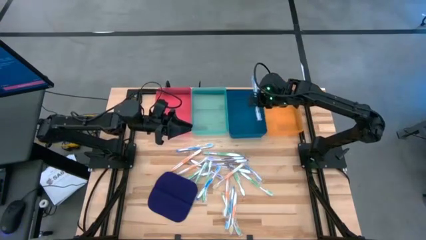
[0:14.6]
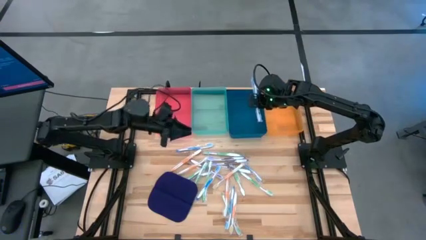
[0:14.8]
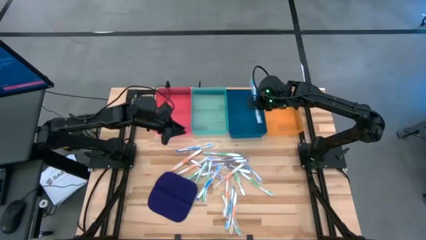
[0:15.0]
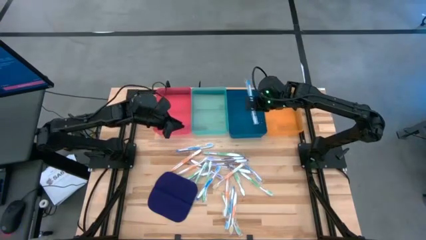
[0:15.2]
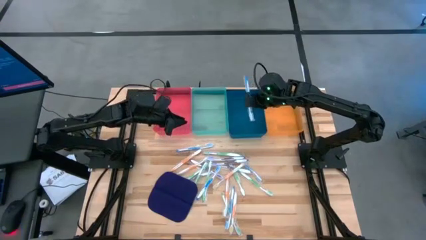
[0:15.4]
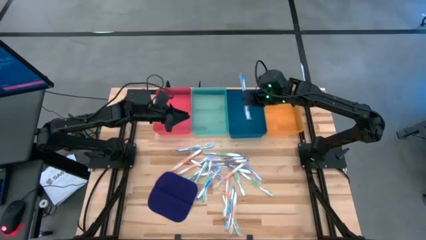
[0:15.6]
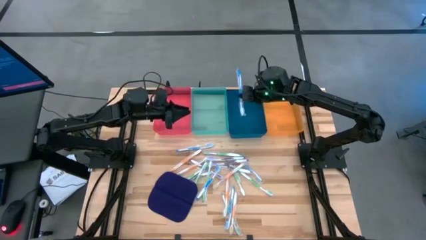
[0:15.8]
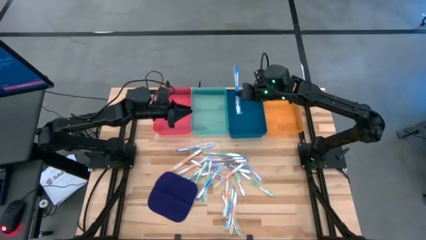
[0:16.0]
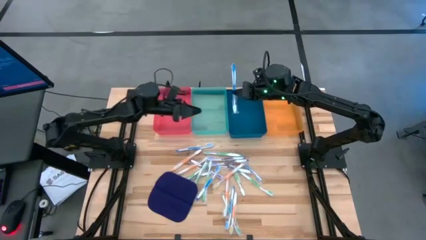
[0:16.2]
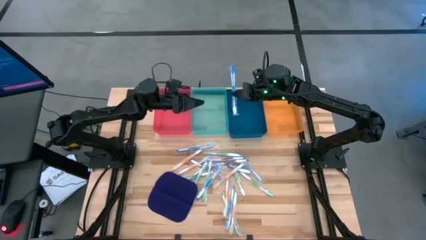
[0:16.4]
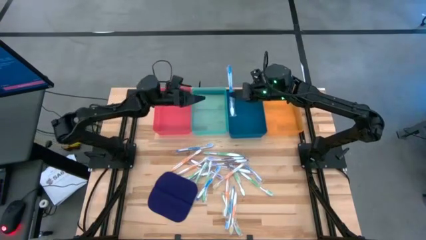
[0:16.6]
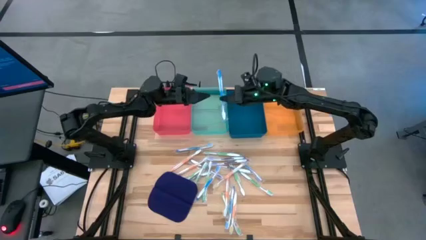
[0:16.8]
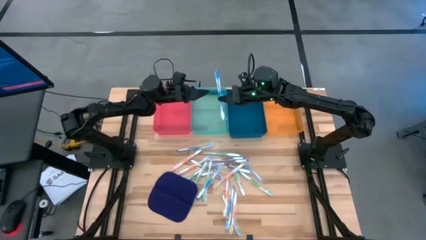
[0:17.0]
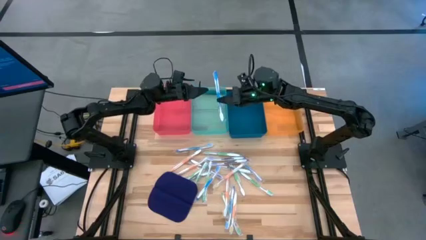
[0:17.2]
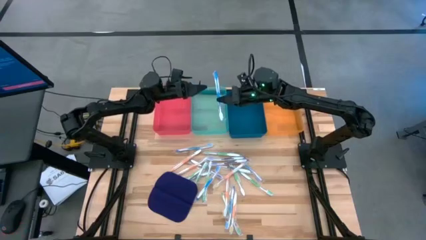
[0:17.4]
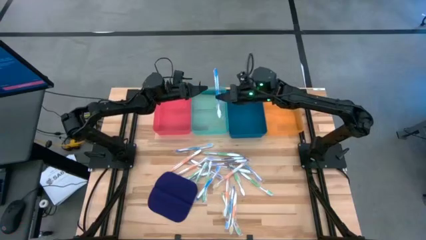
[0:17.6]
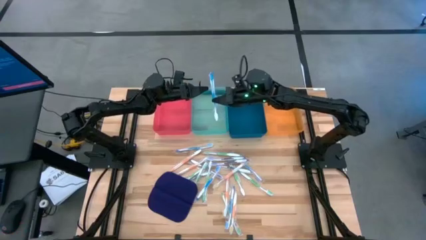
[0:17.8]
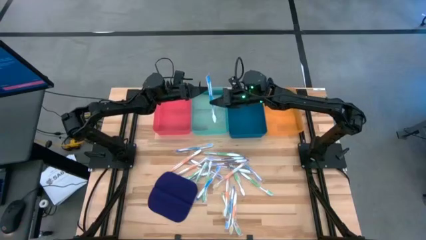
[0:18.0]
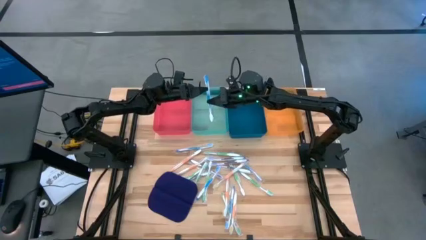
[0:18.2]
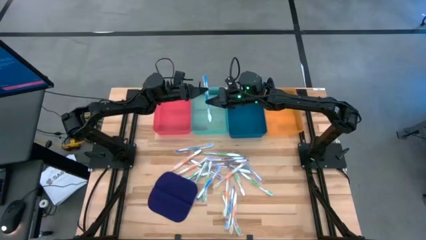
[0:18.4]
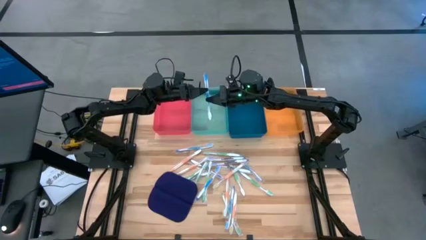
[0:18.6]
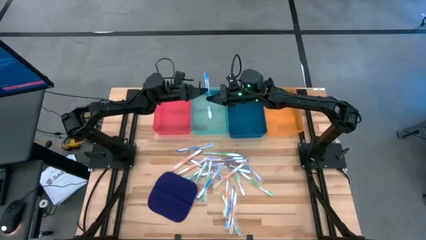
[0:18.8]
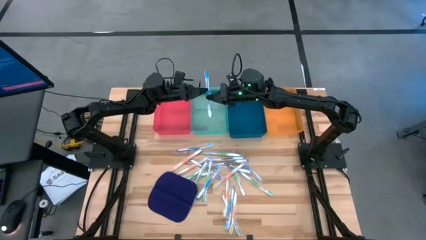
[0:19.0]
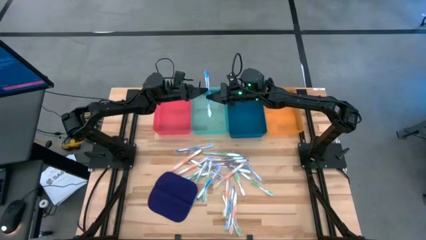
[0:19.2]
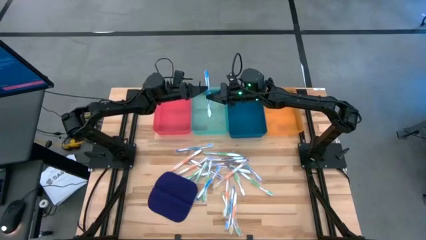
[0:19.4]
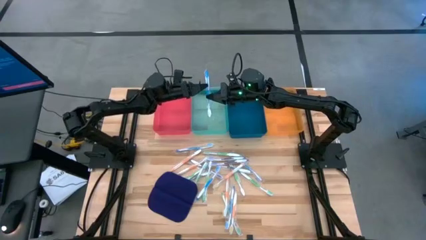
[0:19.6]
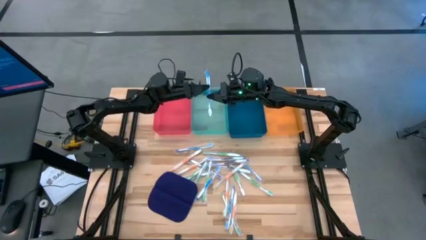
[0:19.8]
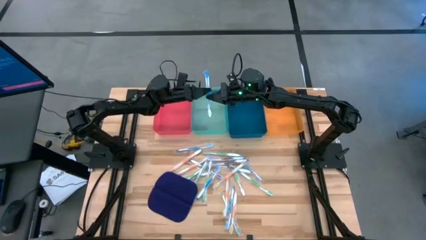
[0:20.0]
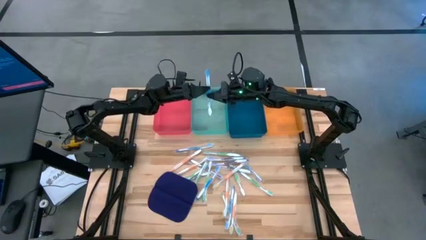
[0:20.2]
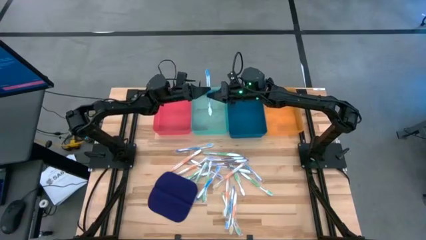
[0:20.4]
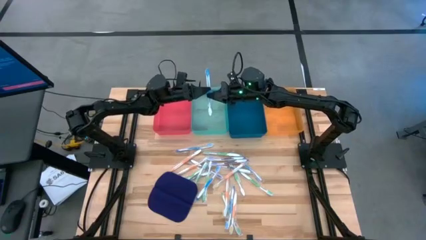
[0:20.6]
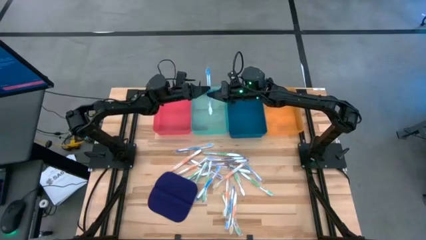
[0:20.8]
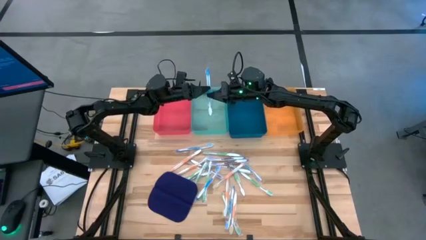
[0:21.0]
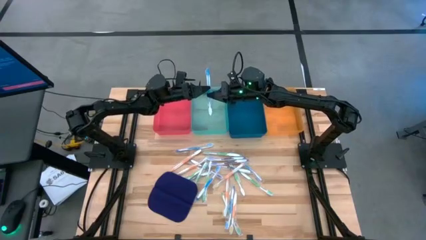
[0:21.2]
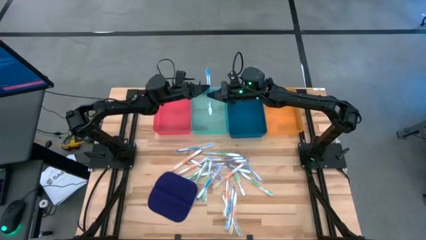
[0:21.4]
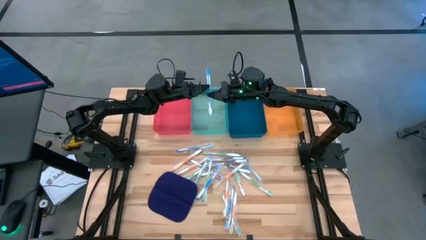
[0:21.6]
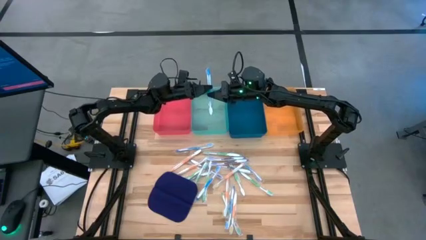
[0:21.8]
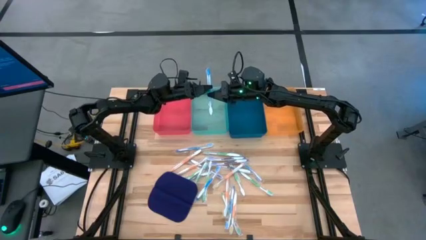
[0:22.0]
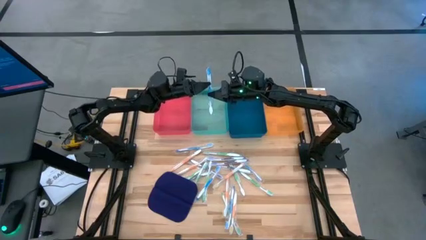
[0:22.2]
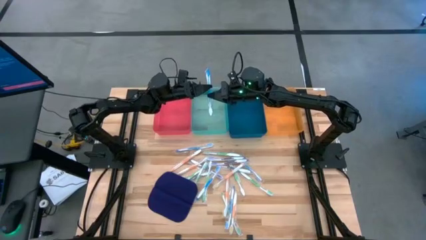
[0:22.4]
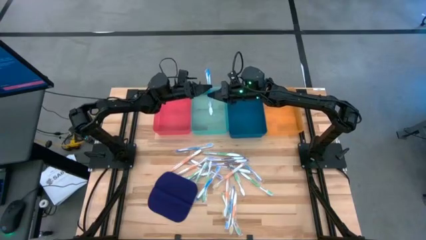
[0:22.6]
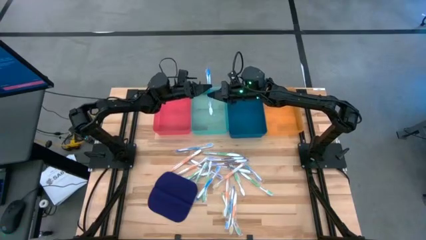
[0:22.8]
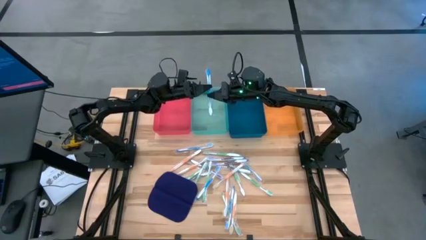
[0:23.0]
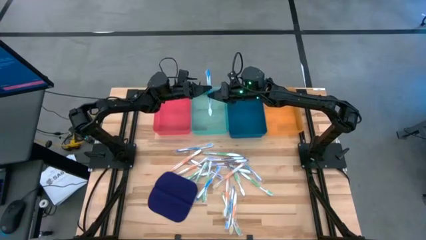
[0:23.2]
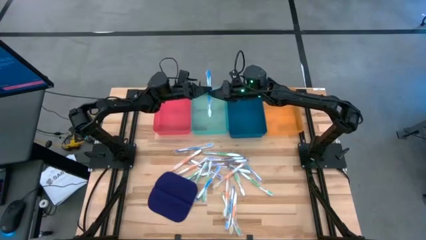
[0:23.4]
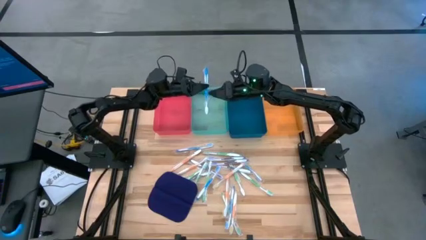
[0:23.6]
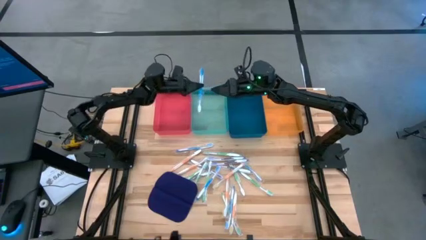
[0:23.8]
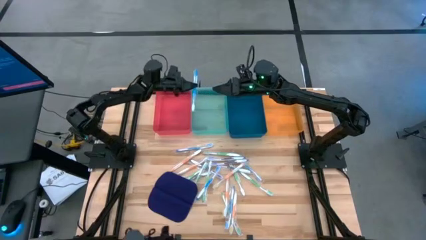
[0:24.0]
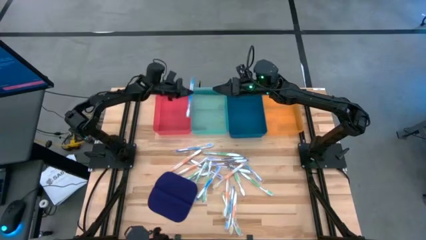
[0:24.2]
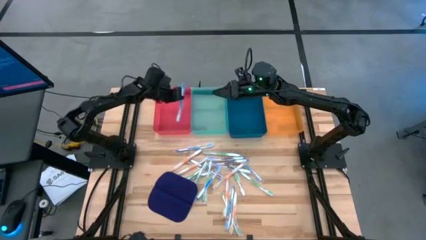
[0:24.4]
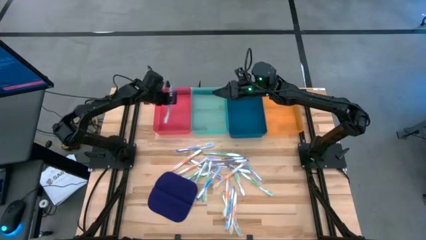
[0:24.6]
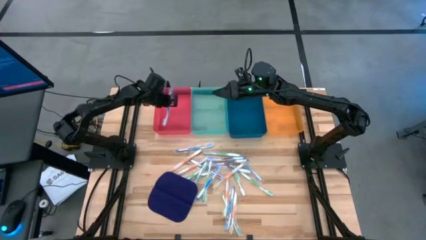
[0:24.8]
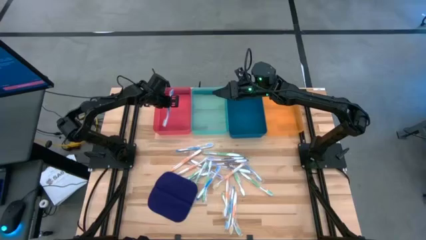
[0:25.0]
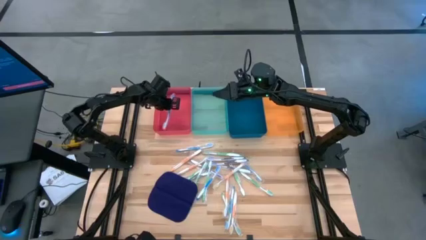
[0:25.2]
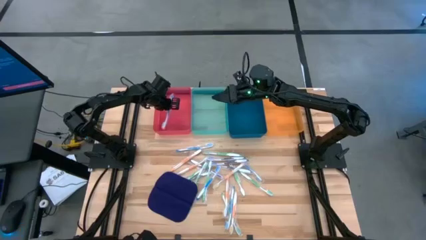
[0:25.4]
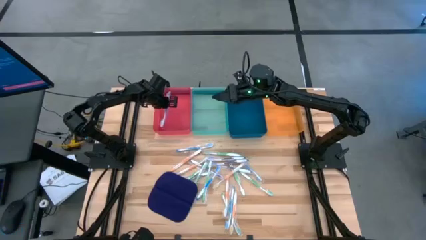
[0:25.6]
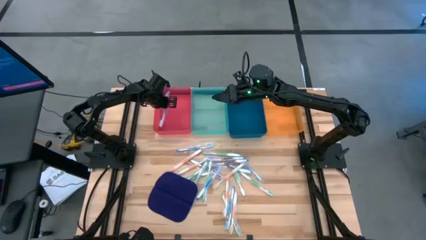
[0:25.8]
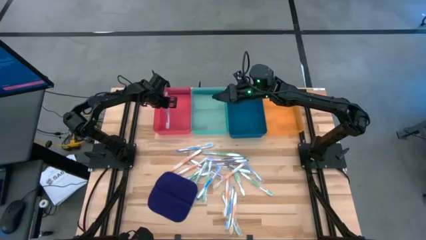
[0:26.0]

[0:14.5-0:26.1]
Task: Pick & Place Toothbrushes
Put the blue toothbrush into the red bin
